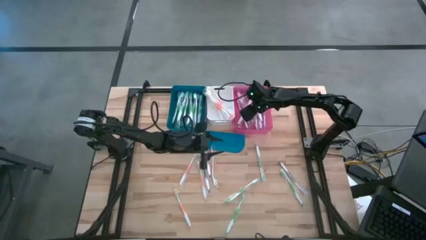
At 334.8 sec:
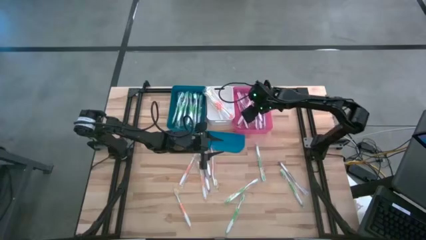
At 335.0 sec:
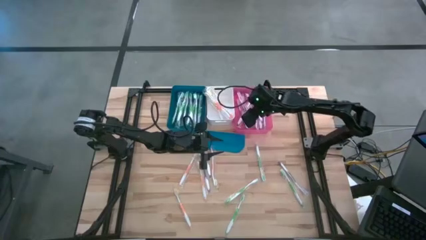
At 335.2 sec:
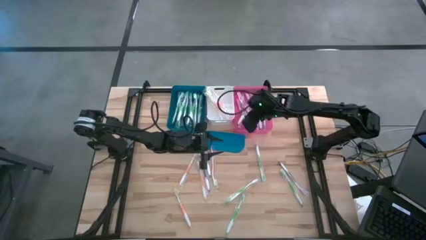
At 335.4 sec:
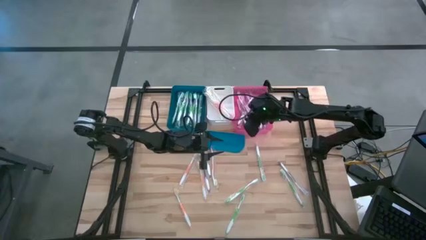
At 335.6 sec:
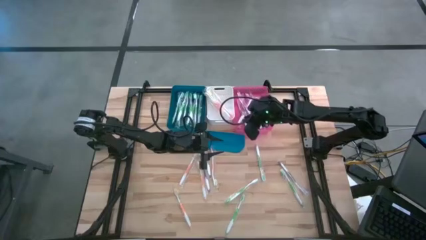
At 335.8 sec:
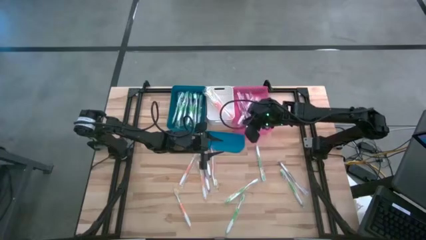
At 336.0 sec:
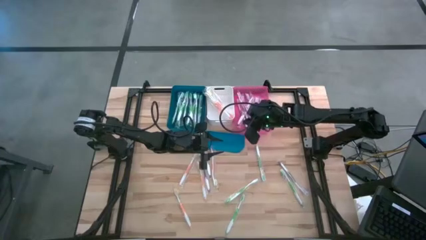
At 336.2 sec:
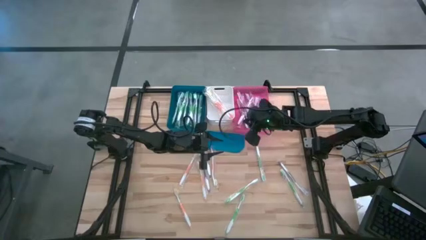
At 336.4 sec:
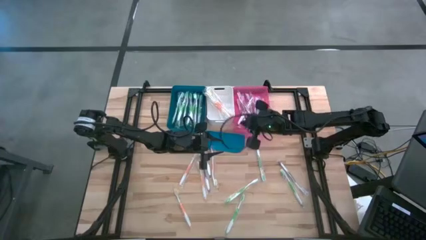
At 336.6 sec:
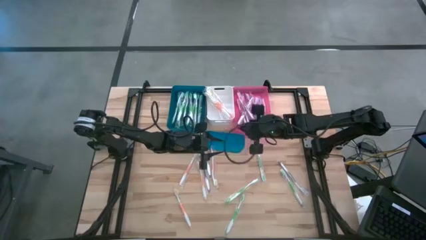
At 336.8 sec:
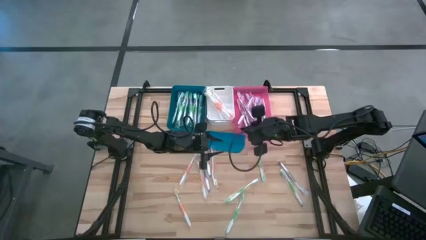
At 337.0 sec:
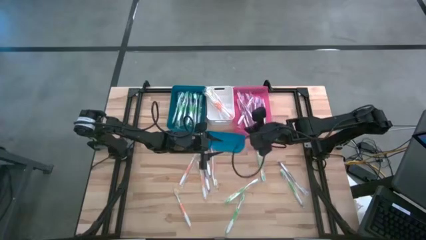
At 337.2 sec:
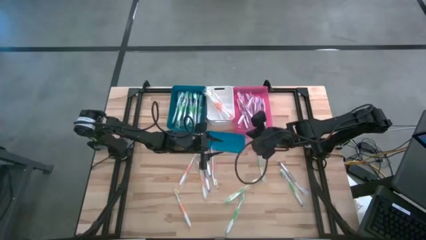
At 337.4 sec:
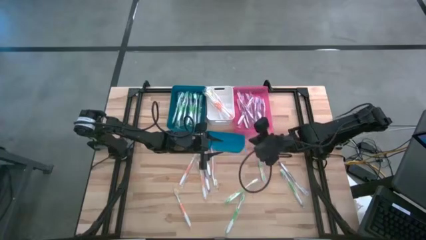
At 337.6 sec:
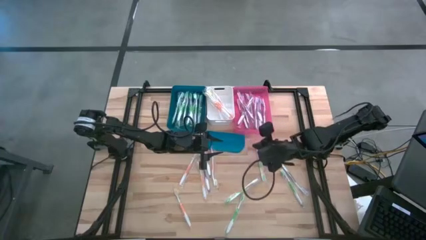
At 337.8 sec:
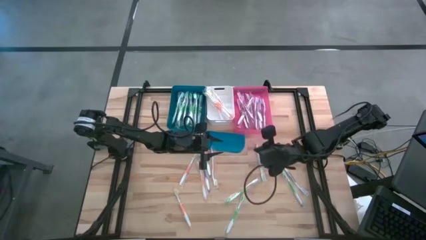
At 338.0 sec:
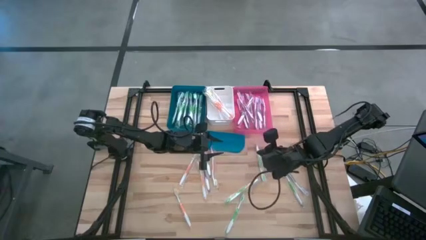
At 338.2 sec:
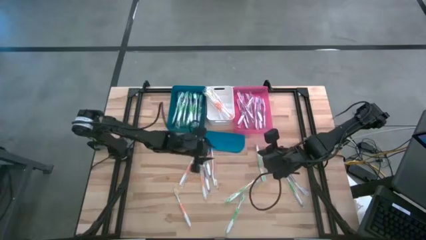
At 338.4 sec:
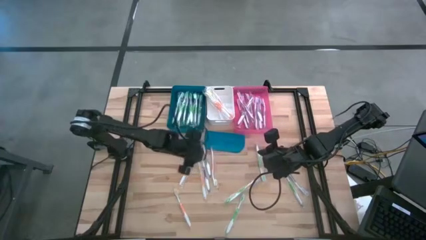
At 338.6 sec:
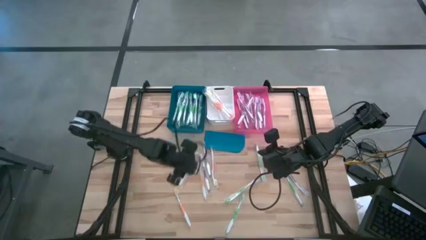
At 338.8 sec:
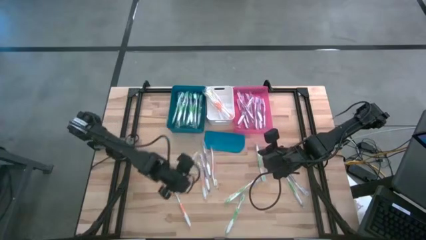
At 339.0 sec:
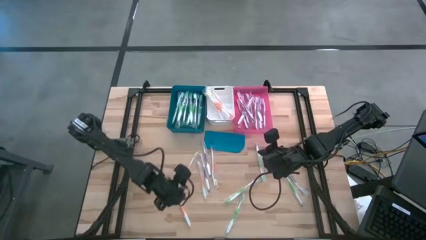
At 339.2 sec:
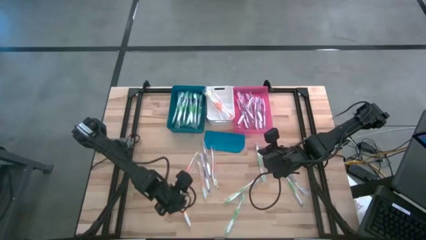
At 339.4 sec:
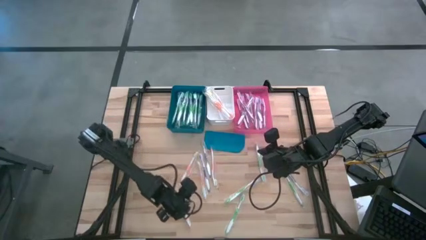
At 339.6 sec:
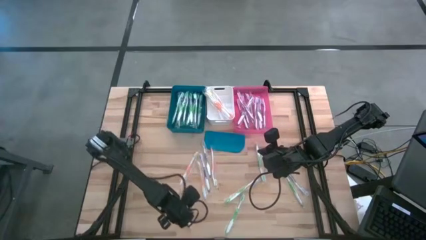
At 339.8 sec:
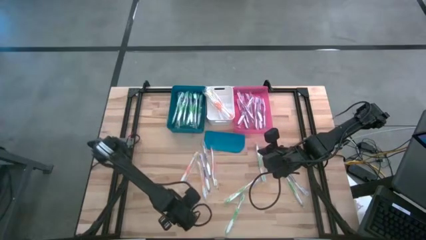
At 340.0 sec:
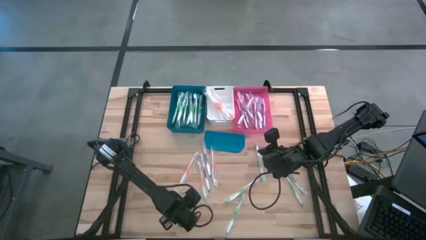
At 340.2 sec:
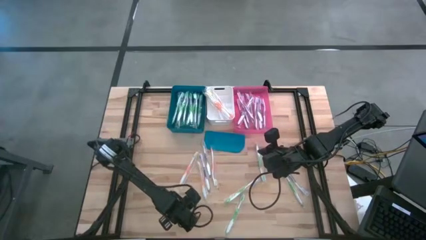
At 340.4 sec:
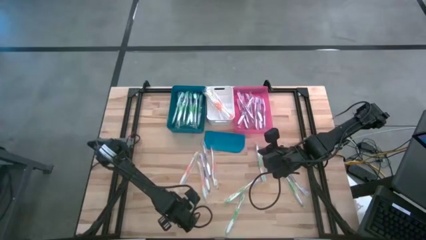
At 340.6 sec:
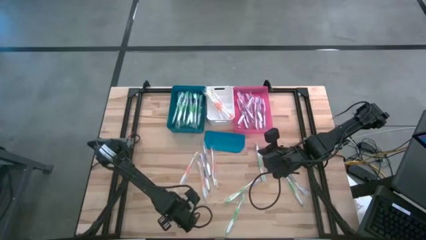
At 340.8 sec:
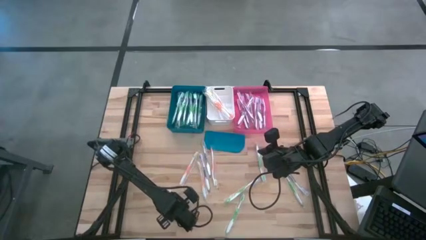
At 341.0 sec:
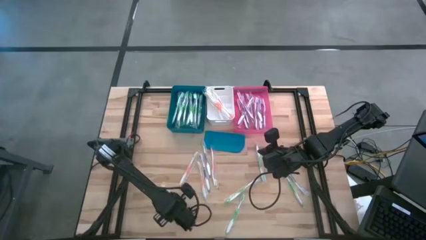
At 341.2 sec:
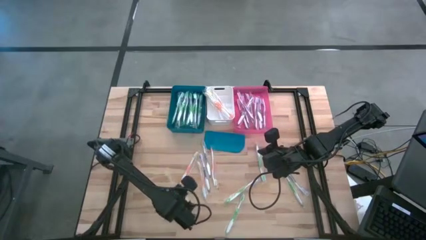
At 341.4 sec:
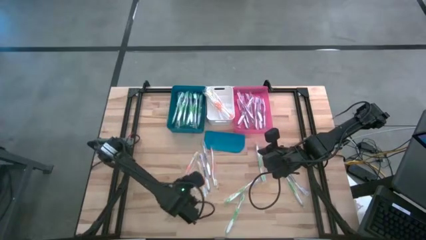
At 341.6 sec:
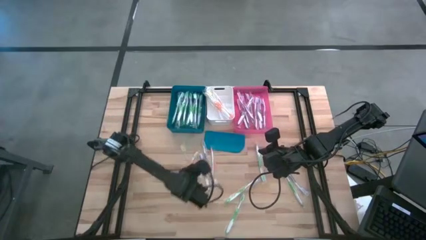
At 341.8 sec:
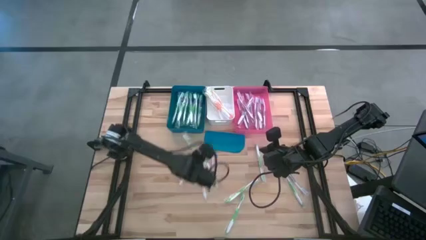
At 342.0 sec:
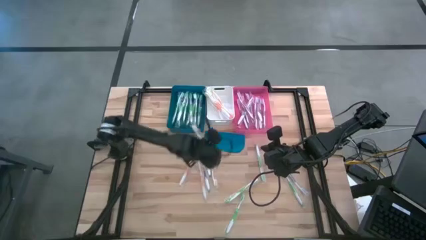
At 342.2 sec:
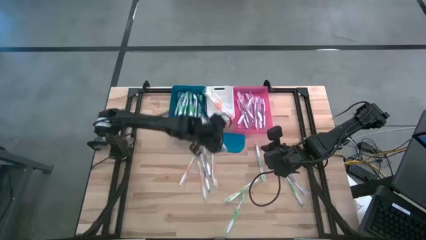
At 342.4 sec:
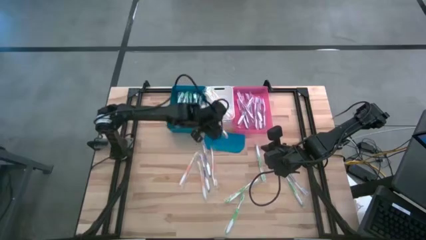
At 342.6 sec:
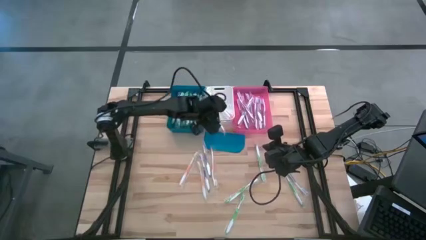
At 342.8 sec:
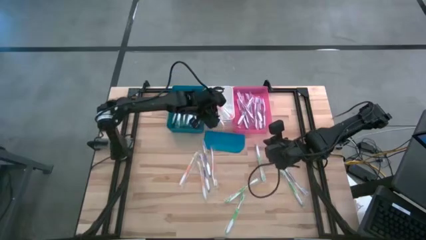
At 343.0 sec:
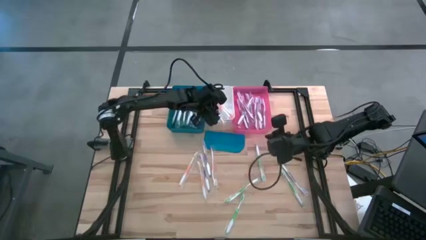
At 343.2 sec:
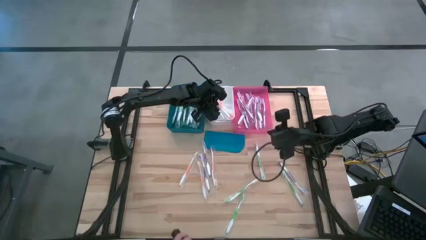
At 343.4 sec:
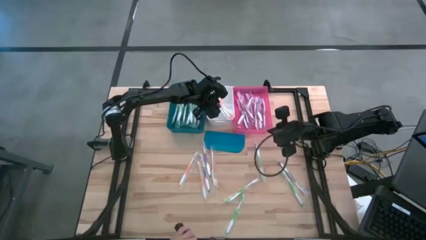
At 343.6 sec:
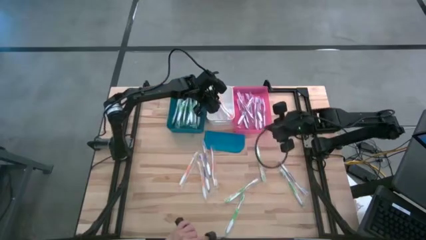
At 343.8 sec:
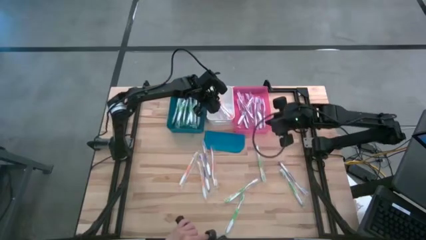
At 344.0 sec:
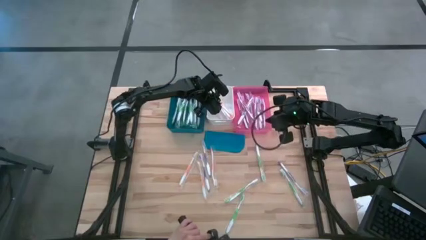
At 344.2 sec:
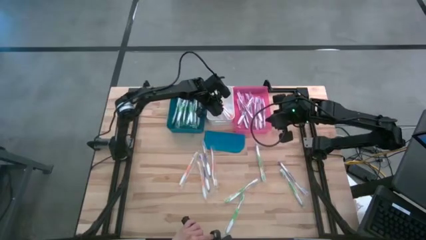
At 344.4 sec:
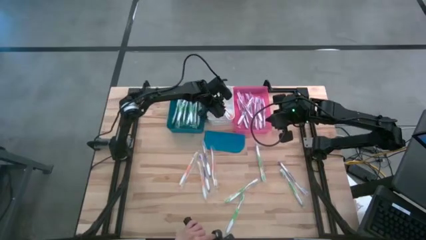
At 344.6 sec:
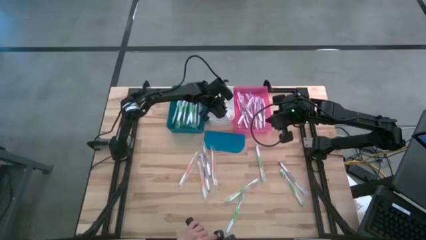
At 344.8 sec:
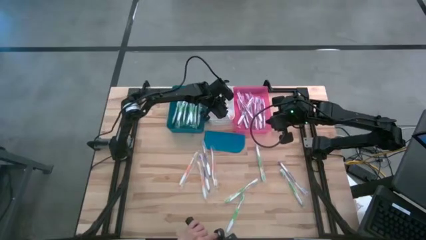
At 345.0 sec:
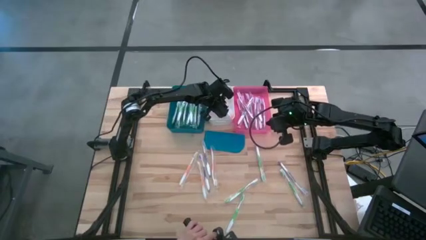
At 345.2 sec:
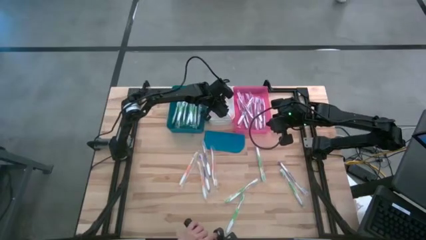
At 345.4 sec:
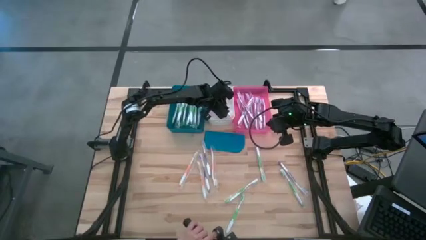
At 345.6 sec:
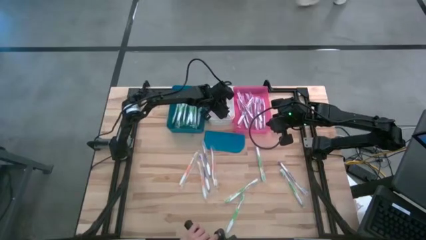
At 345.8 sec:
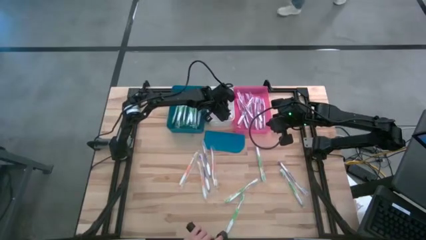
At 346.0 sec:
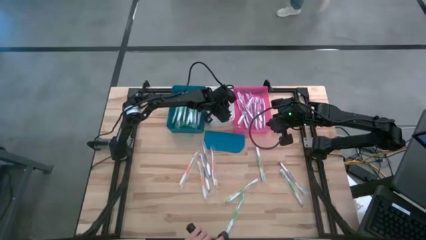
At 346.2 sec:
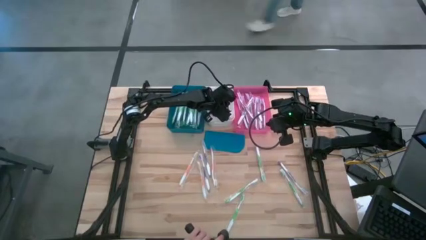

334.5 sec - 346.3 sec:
Task: Pick & Place Toothbrushes
Put the orange toothbrush into the white bin
